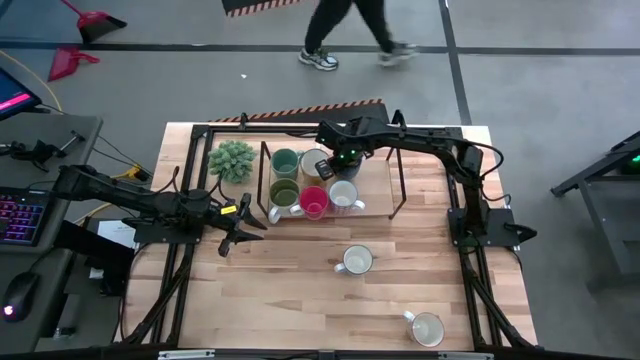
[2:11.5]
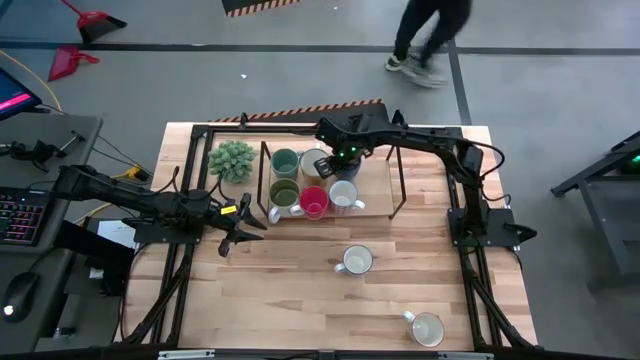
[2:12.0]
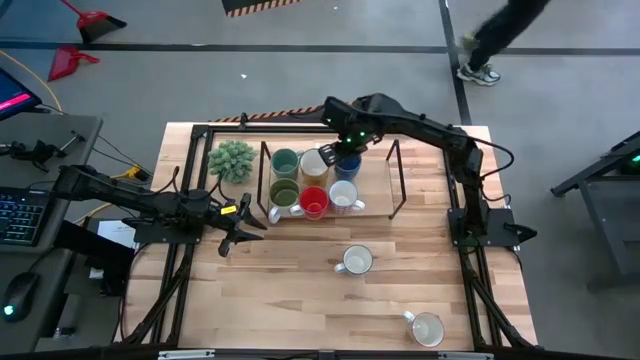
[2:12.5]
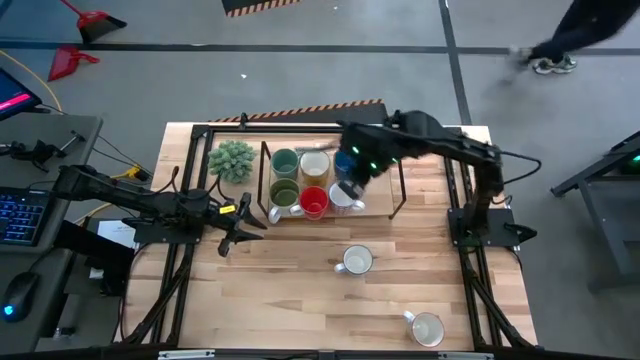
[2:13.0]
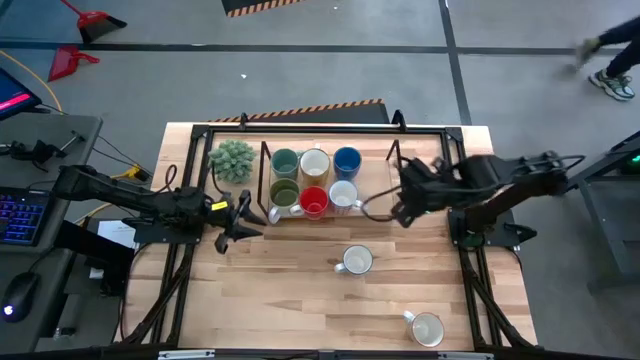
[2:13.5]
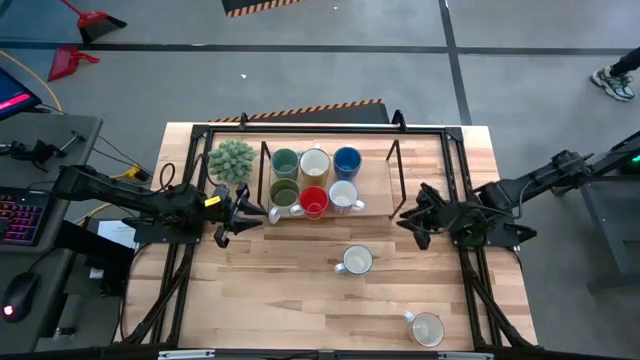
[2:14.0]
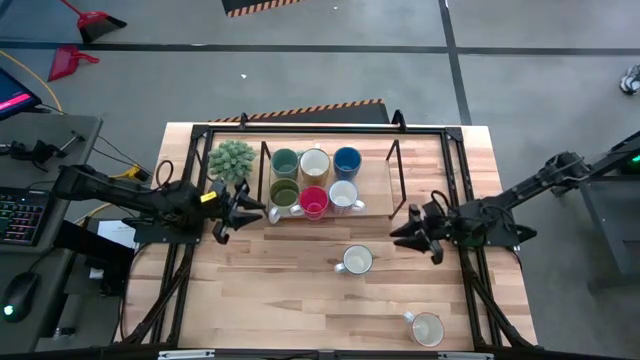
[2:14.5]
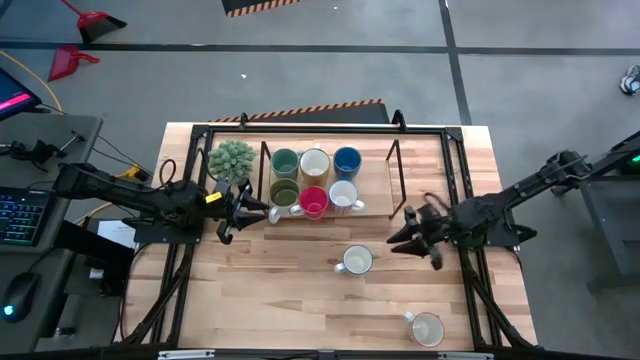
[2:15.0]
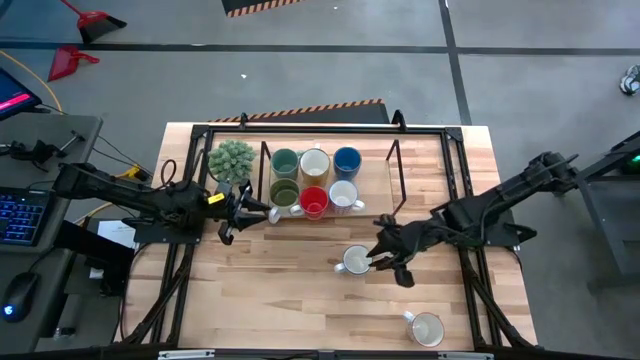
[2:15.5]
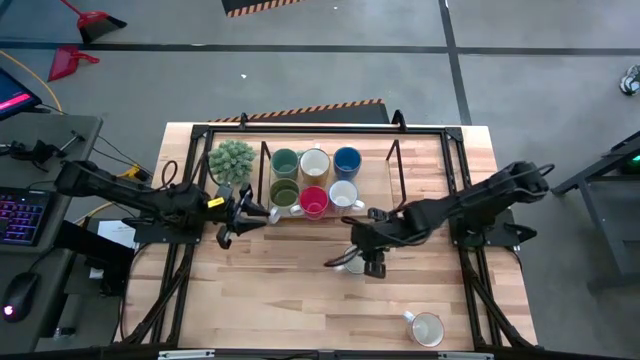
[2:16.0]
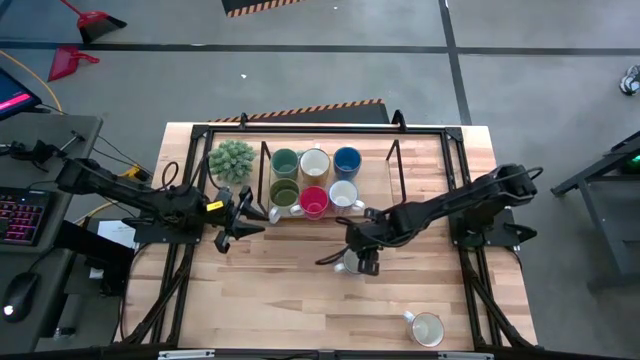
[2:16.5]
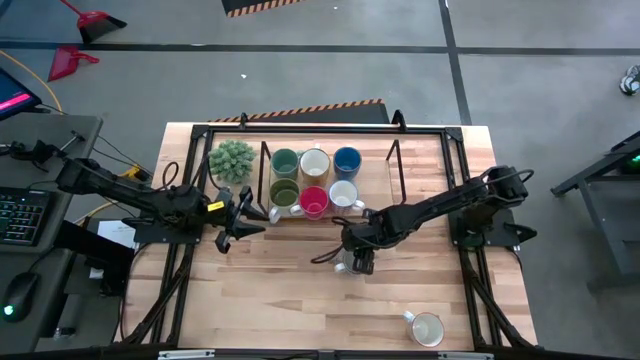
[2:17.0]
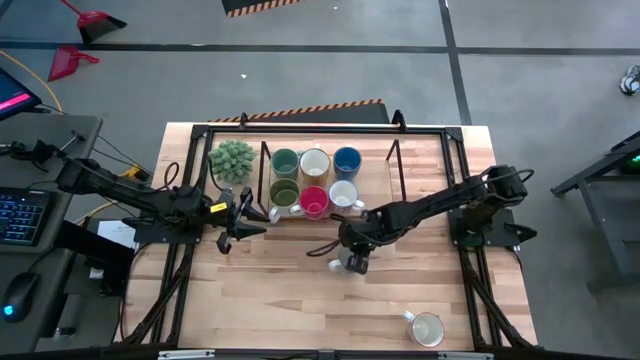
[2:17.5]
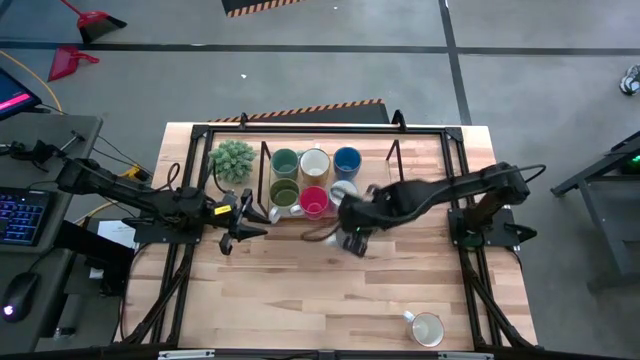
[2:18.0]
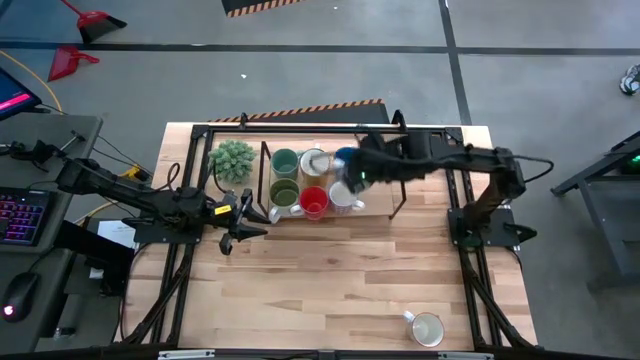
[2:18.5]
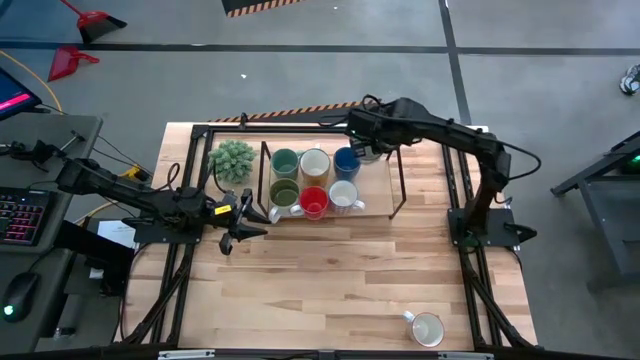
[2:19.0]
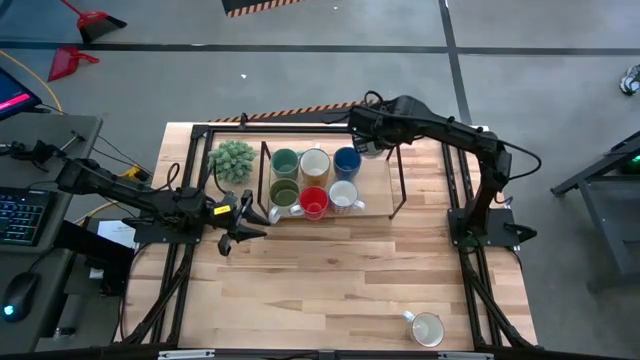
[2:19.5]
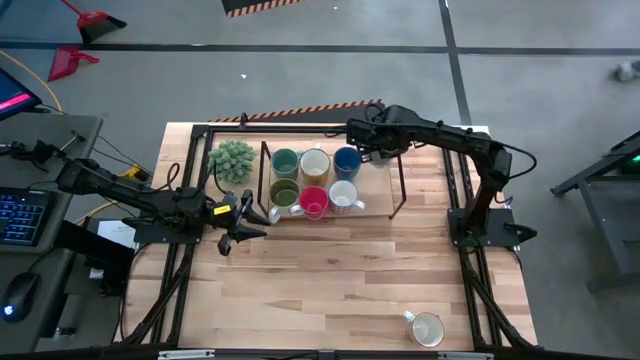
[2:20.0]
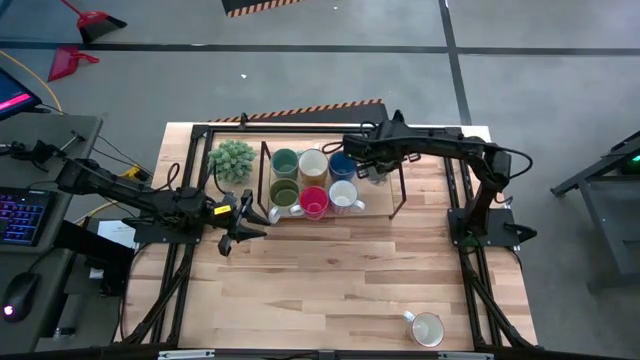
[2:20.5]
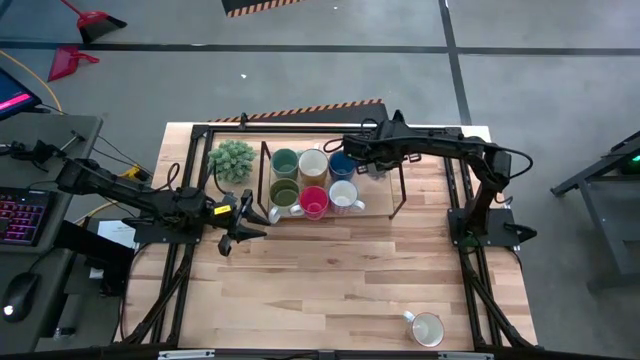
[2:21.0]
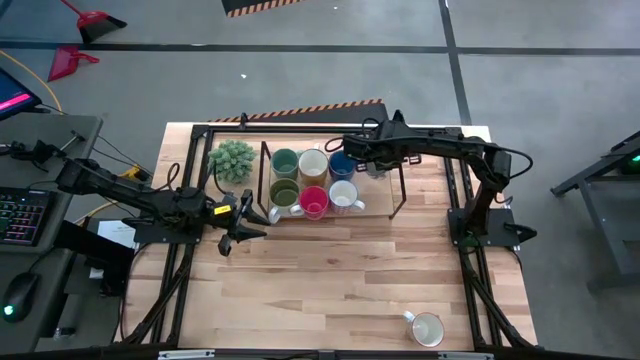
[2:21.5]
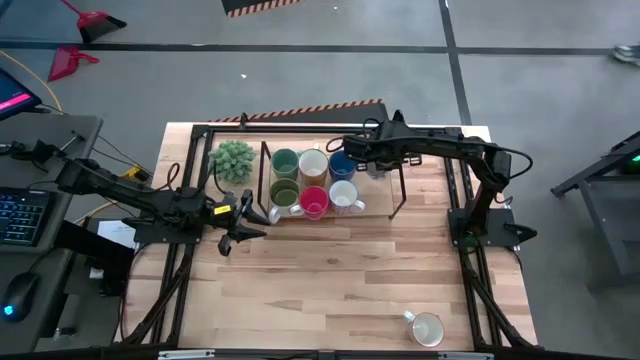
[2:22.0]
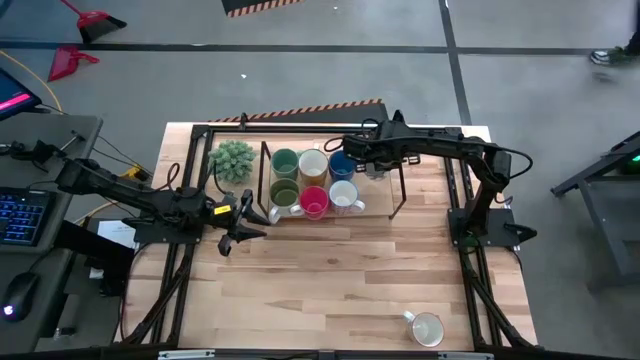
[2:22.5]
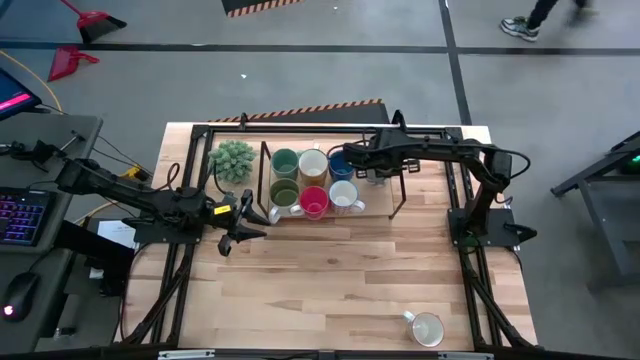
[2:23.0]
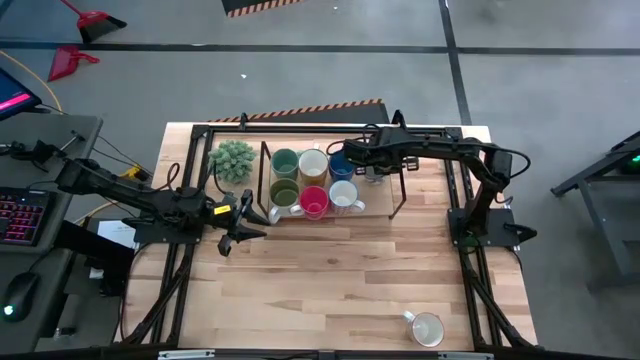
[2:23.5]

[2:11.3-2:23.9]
Task: Place coffee mugs
Put the blue patterned mug on the shelf
